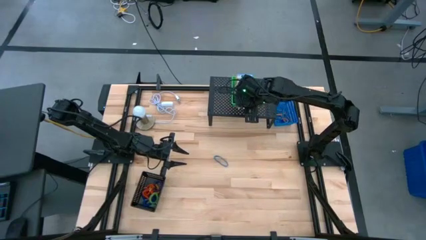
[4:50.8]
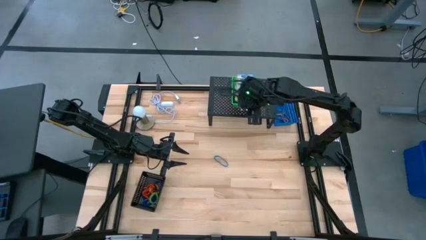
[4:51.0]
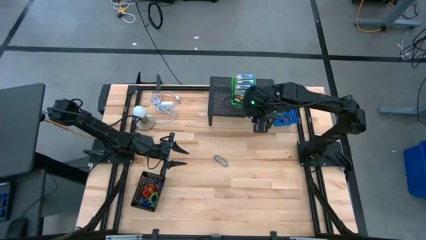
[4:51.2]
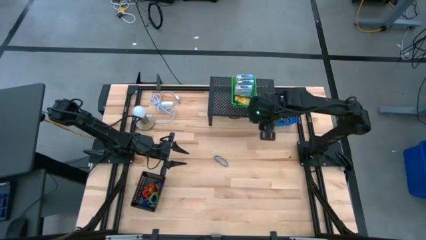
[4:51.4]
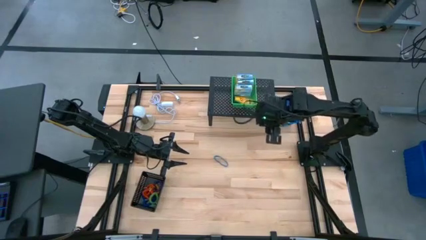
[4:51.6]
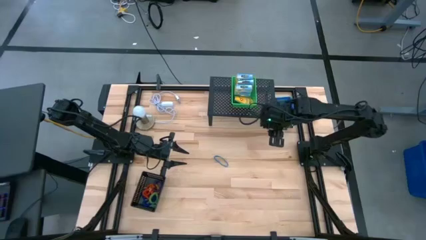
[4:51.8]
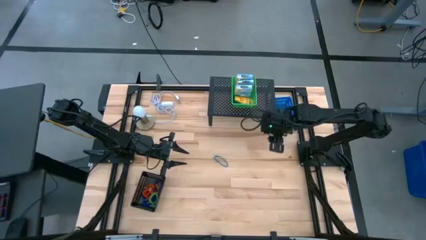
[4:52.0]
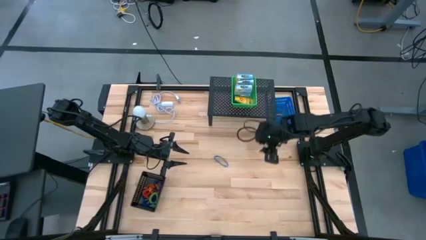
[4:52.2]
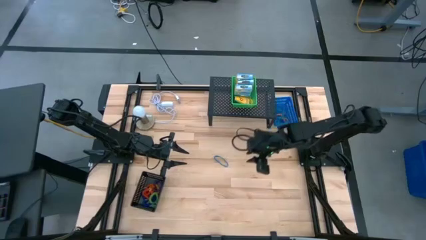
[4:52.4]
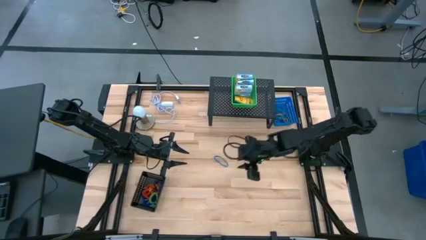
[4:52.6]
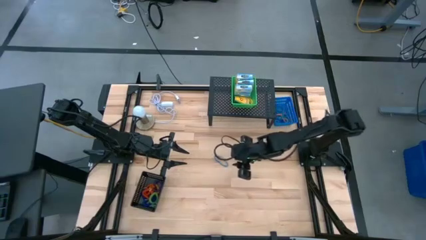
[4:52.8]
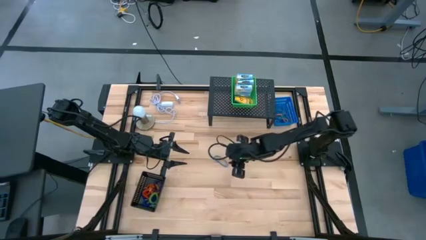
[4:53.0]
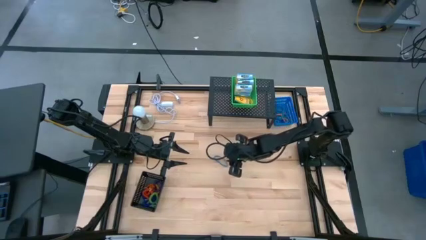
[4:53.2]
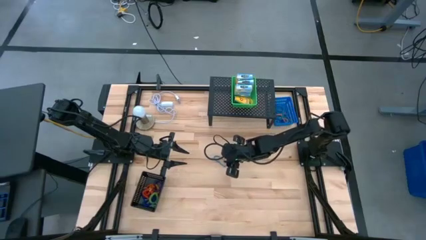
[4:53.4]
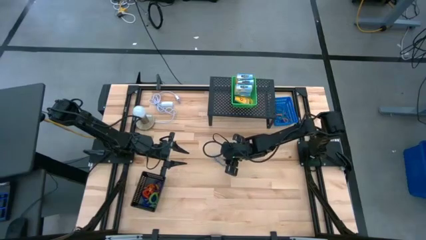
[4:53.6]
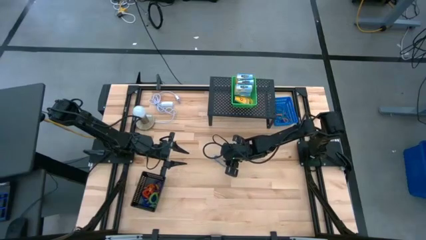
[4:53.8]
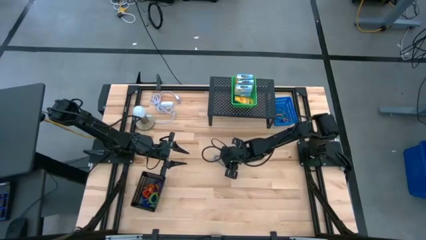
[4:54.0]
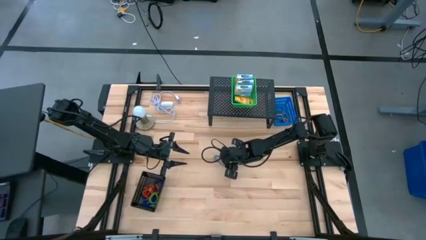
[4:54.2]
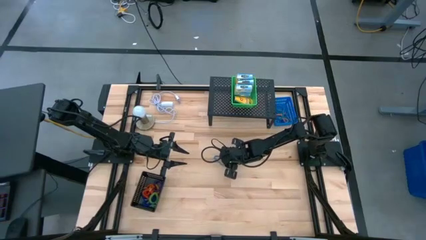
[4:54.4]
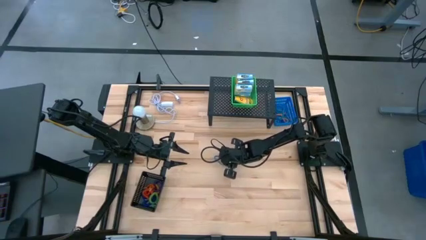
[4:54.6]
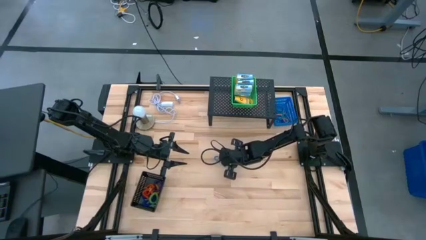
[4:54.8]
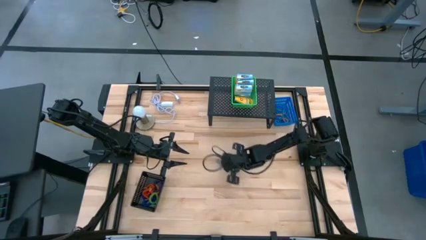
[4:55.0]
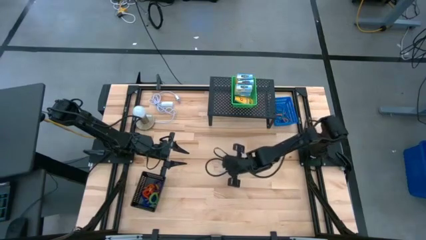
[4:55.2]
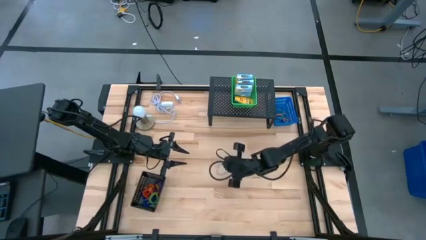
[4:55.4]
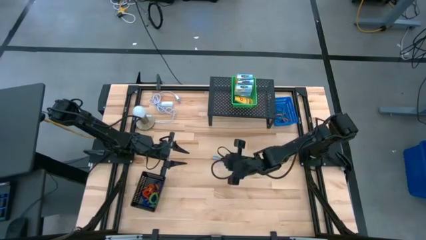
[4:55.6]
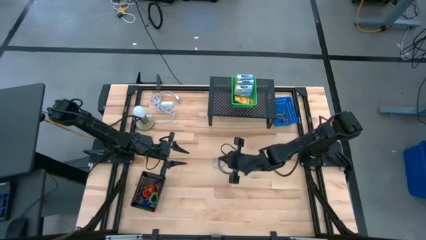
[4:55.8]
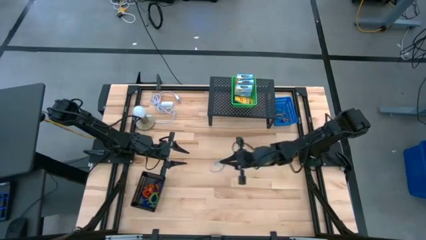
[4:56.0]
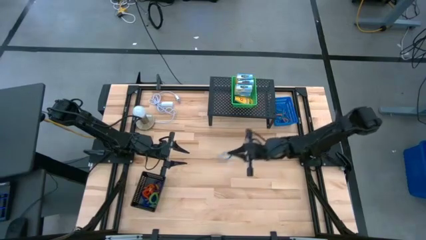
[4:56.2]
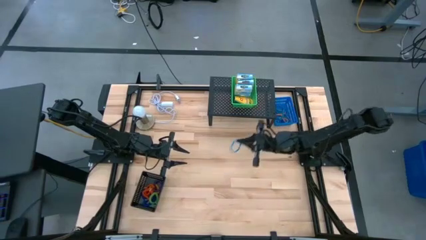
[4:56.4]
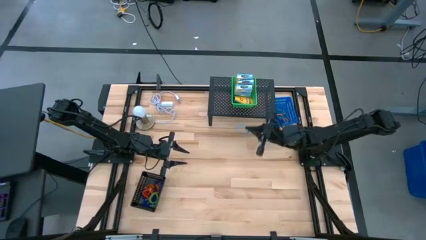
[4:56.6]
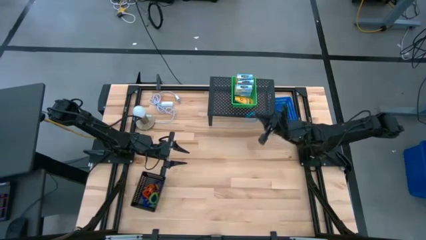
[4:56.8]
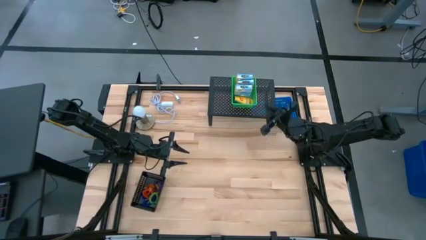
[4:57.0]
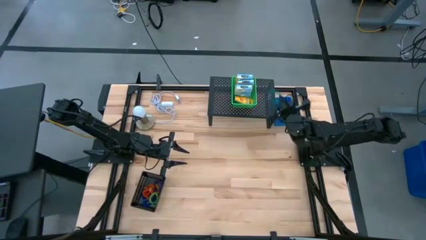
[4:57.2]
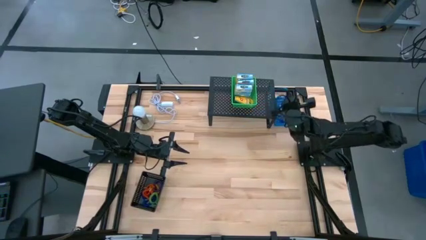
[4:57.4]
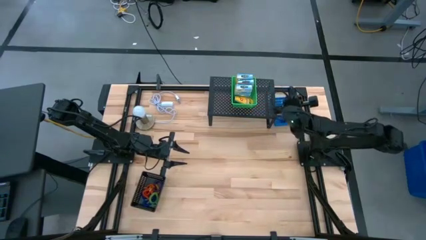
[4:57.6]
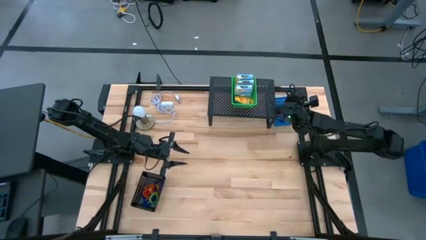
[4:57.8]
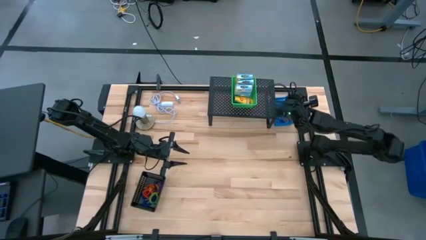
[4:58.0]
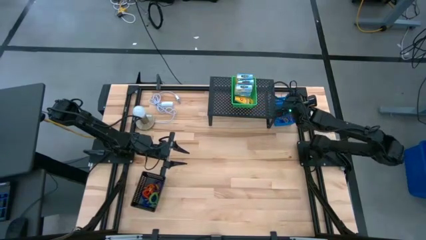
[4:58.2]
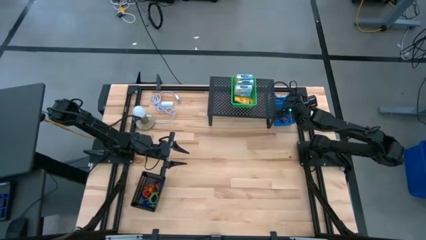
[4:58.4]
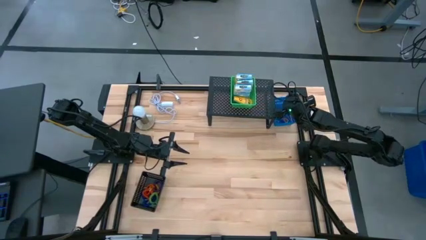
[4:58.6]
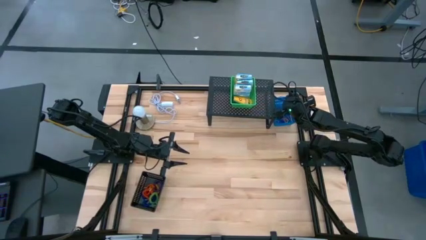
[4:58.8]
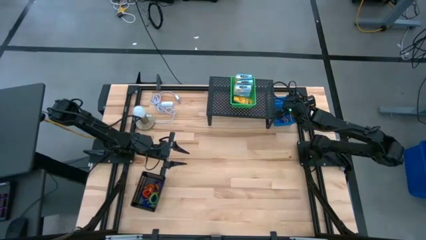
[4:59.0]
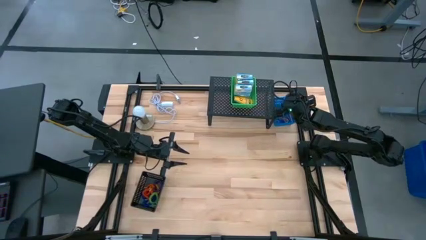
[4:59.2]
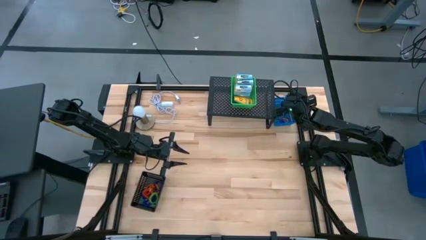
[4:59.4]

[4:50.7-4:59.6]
Task: Pick & Place Office Desk Supplies
Put the blue rubberband into the blue bin

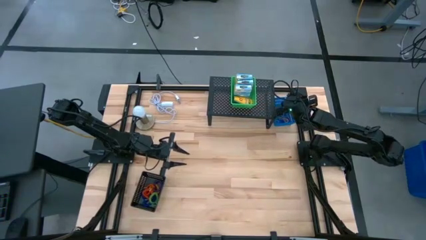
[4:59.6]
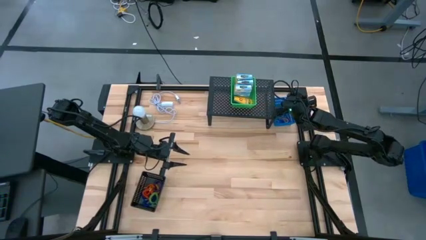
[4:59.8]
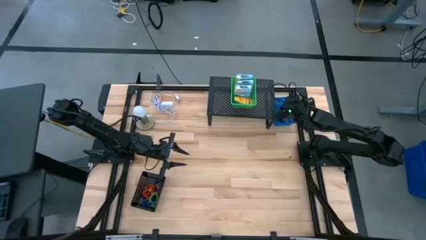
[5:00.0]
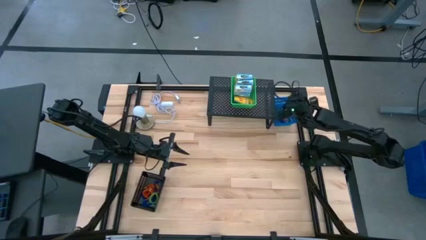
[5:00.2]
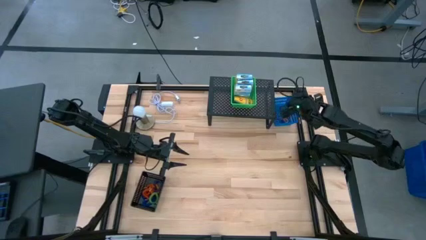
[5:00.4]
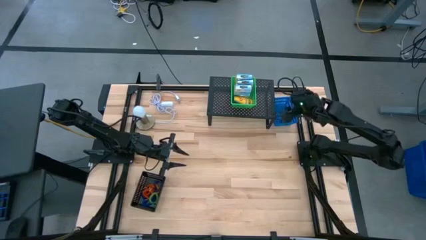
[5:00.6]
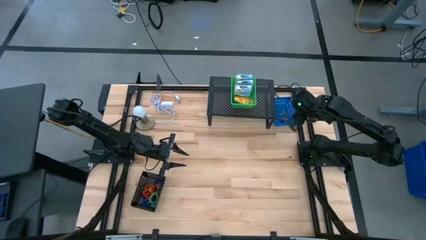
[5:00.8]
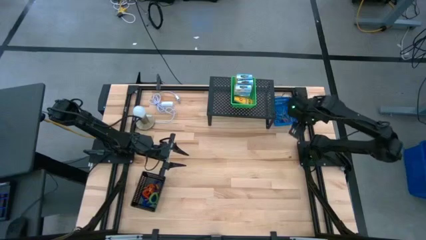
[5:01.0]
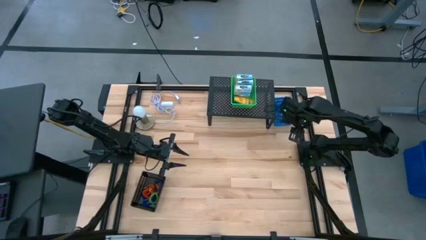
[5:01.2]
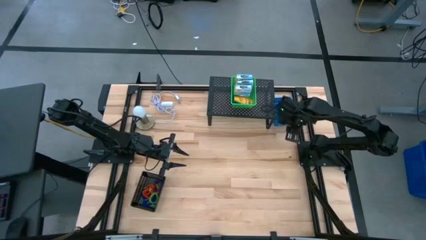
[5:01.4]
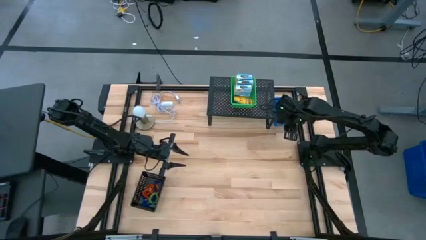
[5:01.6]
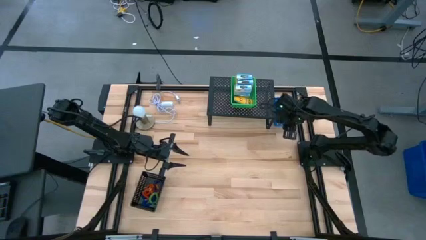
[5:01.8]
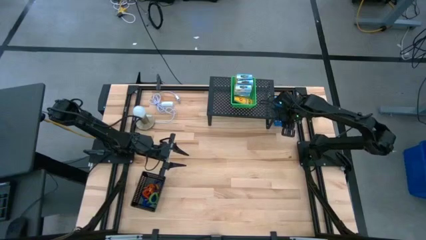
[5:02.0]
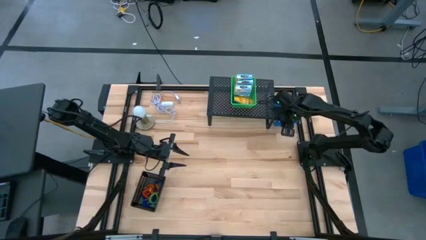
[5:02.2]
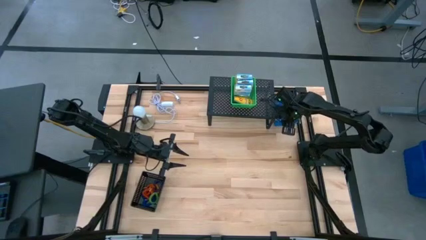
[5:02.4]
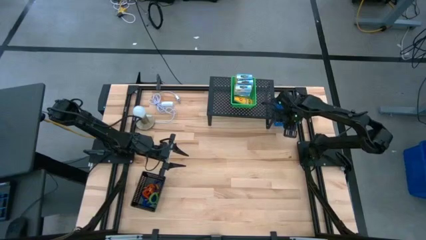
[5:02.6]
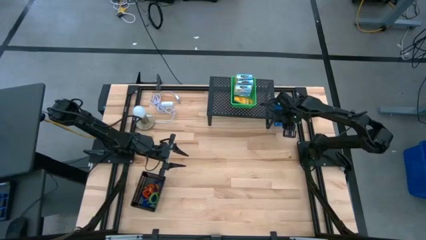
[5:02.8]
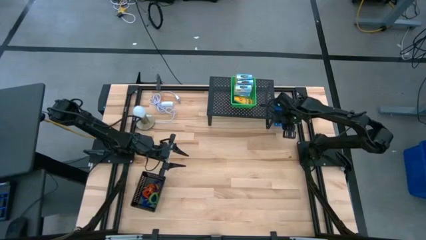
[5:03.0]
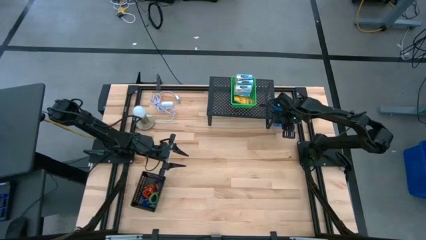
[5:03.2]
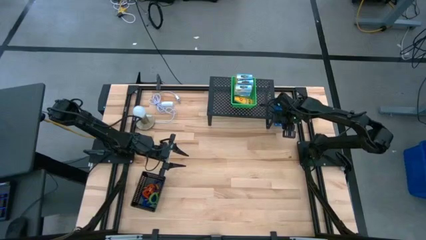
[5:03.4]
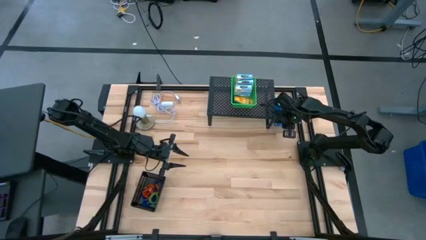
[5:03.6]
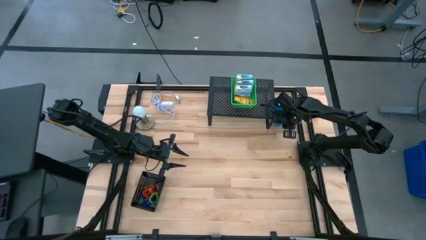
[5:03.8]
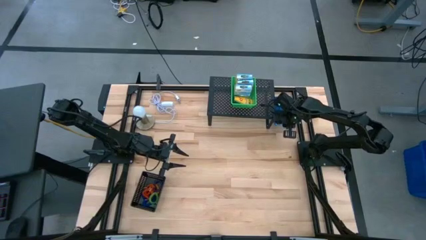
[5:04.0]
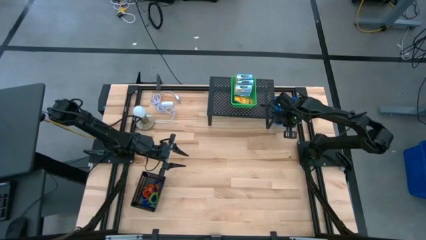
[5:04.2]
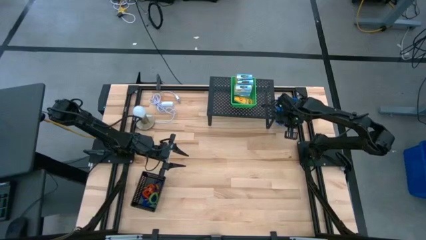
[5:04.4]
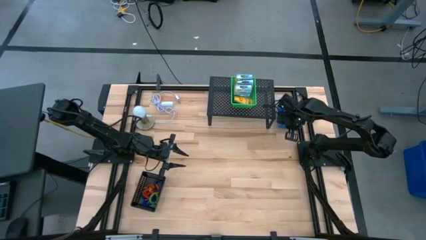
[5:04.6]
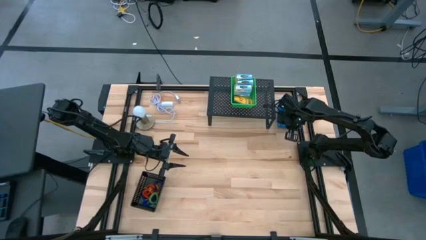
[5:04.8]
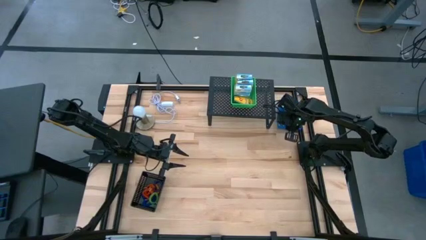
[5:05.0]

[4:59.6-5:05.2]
Put the blue bin on the shelf
